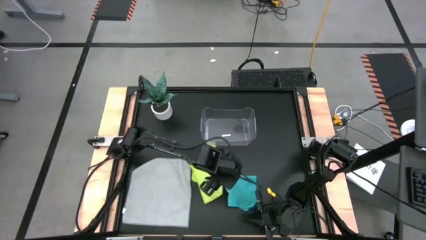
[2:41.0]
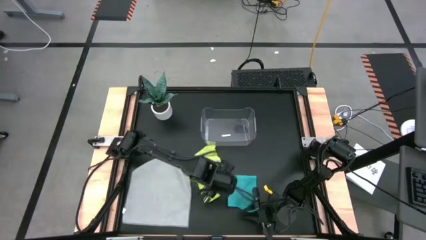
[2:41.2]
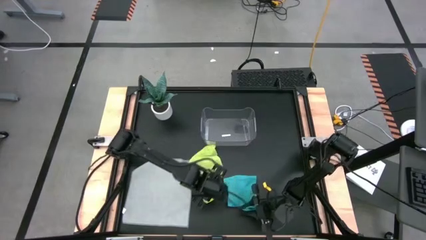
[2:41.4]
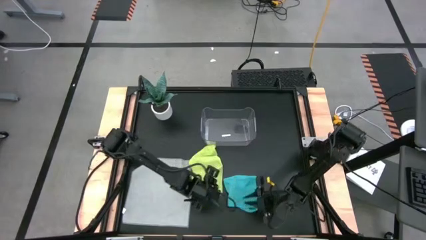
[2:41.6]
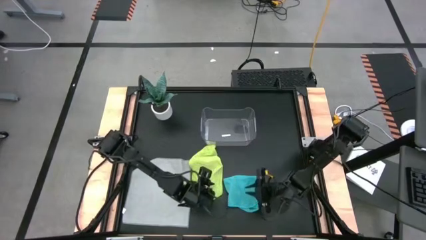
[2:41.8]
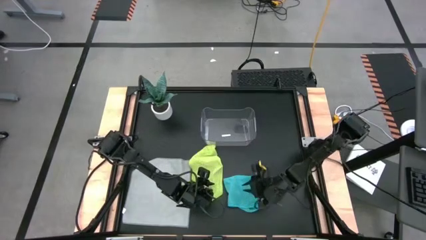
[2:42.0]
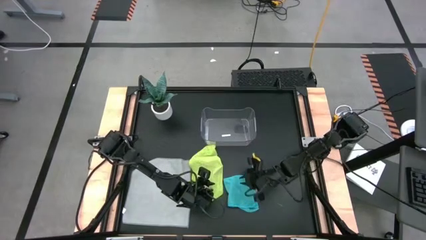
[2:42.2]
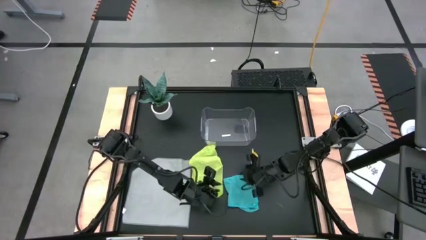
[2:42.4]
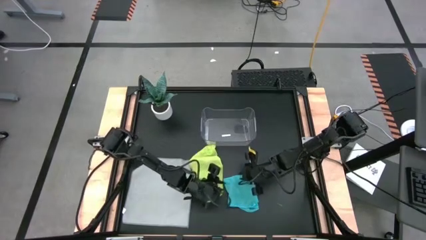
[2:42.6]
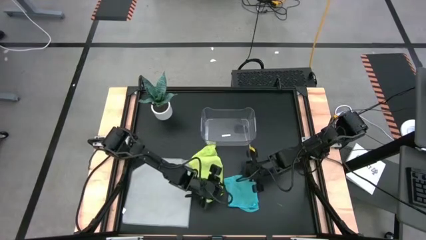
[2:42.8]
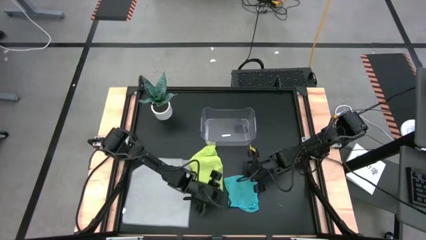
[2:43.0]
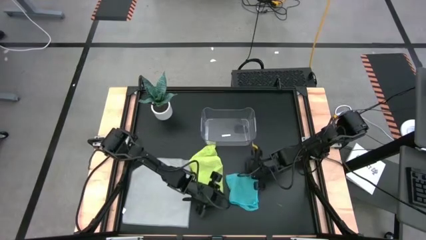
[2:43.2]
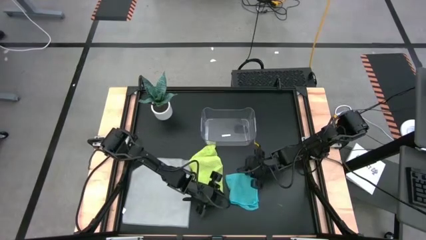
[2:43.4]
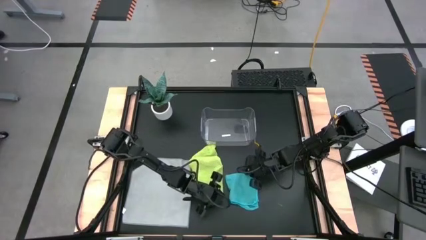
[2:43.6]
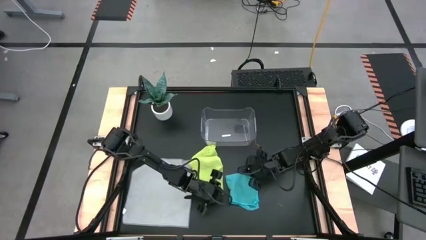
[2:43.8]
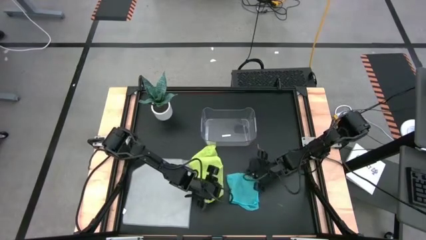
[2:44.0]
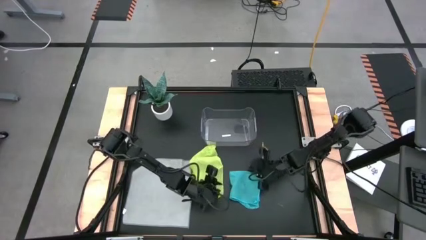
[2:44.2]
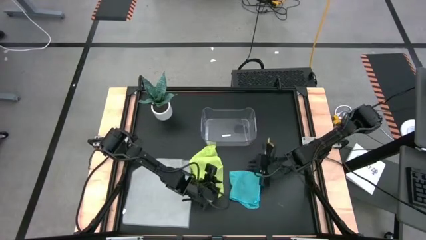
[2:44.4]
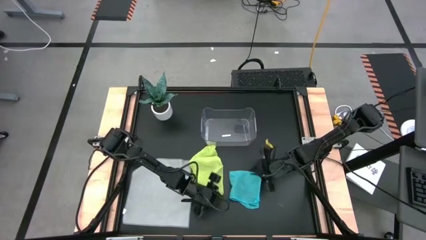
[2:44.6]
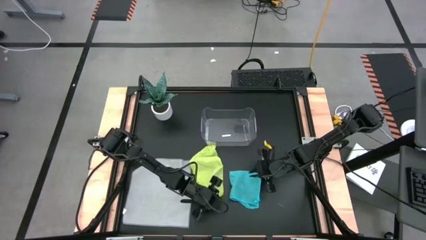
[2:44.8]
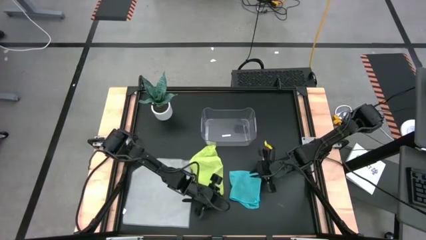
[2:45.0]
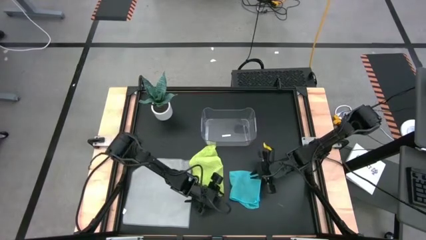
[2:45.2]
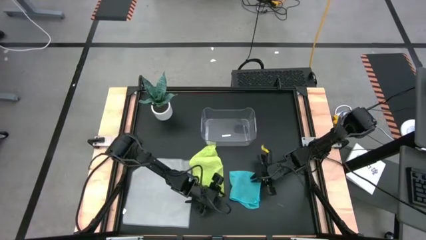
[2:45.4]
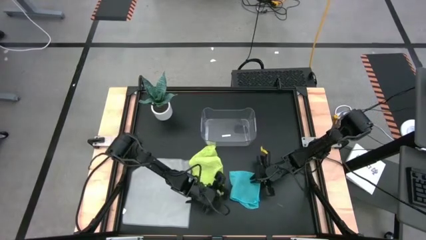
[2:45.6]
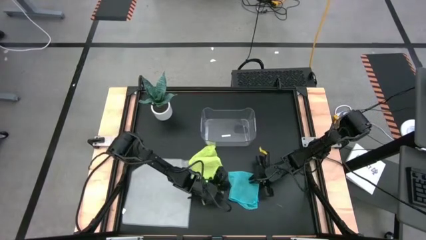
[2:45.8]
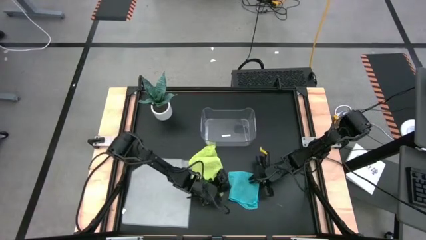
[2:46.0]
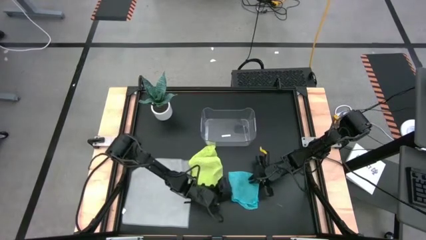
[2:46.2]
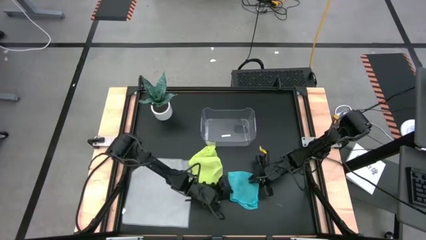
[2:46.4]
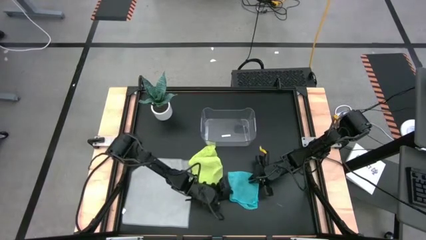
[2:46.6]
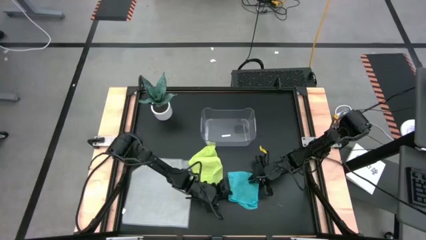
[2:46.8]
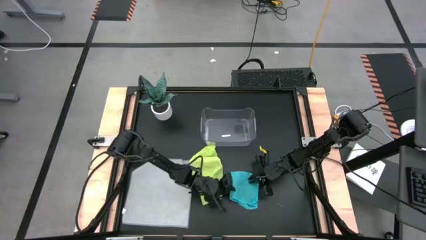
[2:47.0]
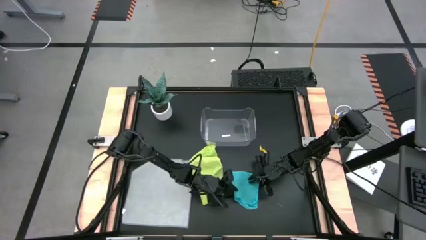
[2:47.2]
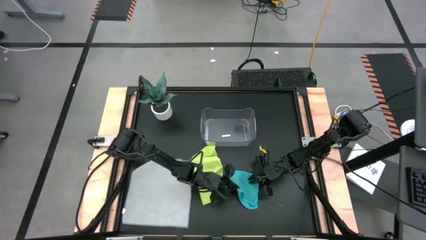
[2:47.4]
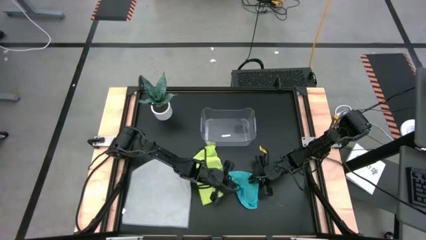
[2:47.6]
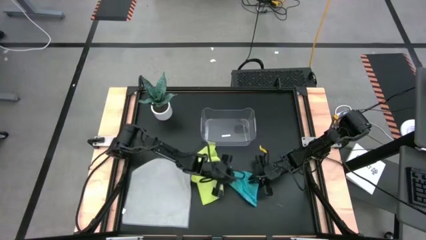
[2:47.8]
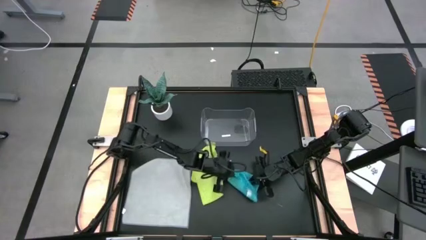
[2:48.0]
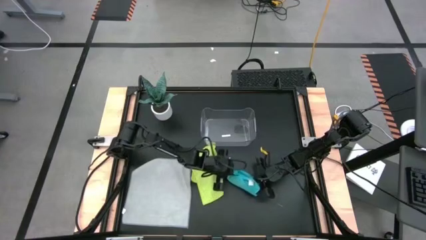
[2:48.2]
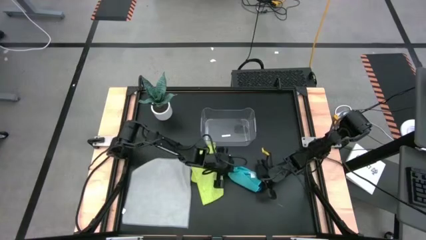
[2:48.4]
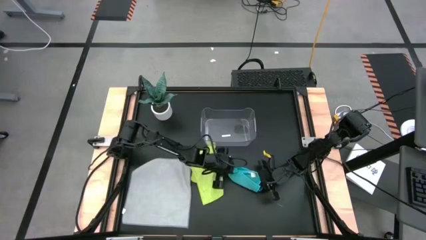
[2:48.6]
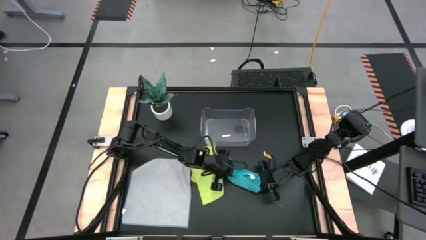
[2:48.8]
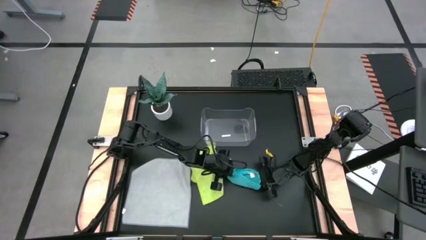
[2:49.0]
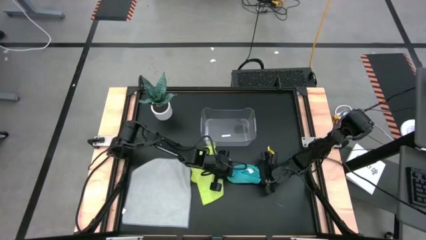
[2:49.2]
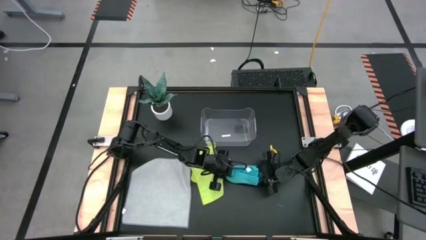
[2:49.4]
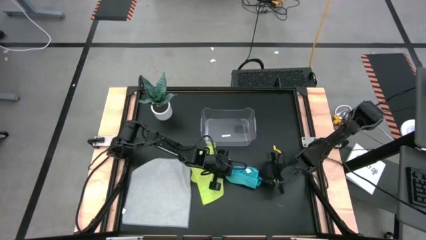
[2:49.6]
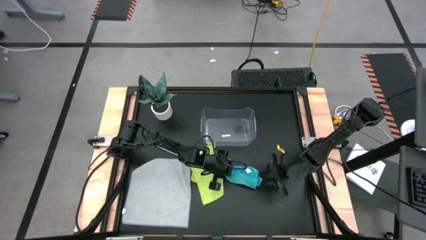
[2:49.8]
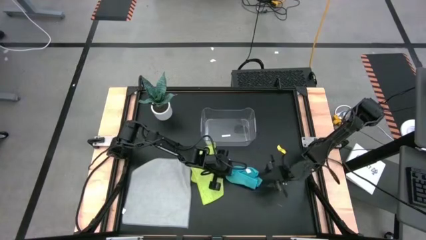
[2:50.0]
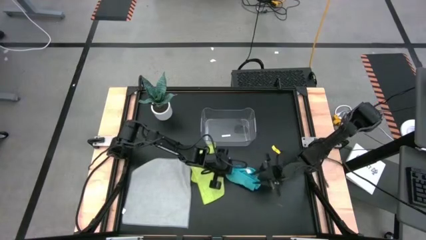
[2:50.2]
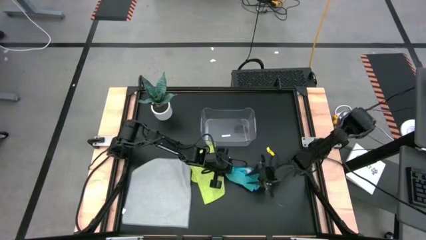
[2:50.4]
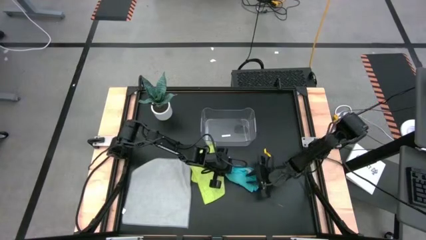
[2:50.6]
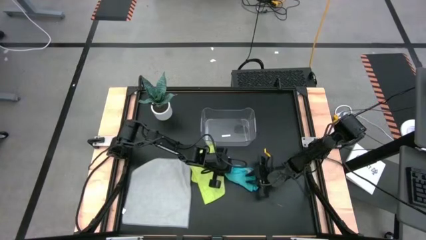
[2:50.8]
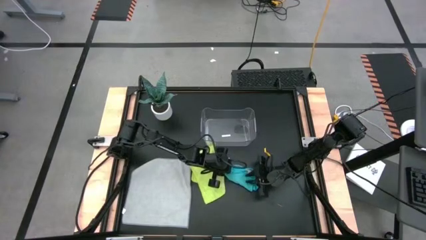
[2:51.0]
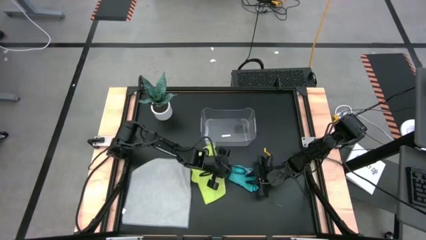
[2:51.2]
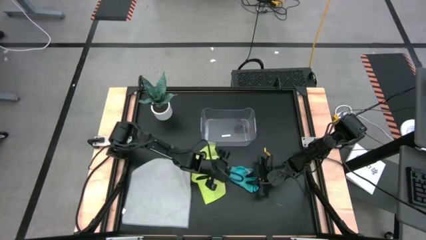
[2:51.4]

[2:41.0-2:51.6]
Task: Fold microfiber towels
Fold the blue towel

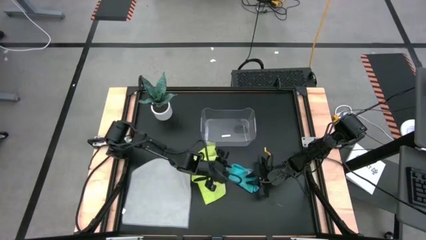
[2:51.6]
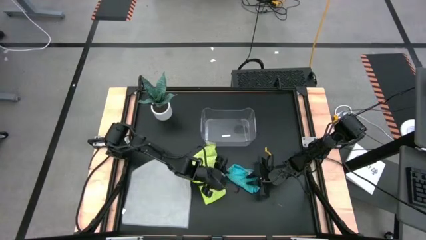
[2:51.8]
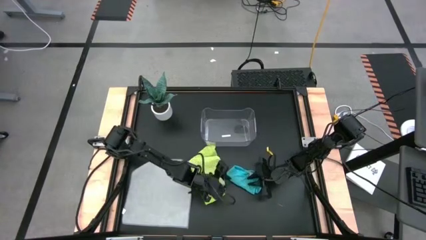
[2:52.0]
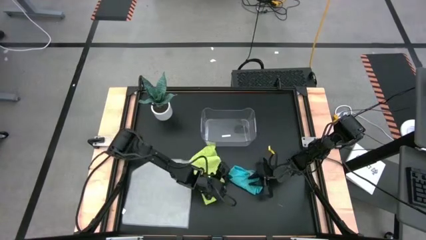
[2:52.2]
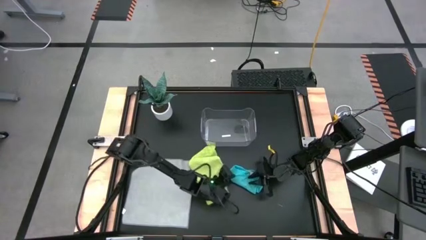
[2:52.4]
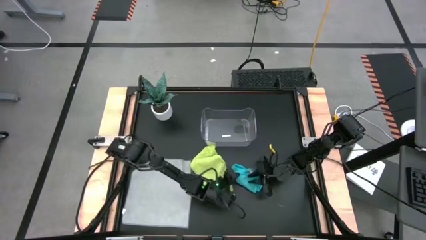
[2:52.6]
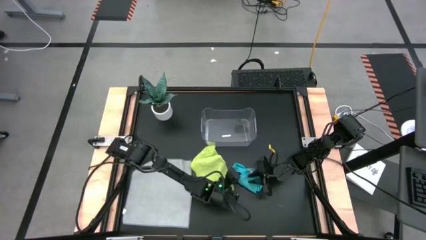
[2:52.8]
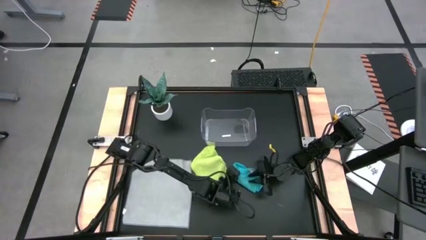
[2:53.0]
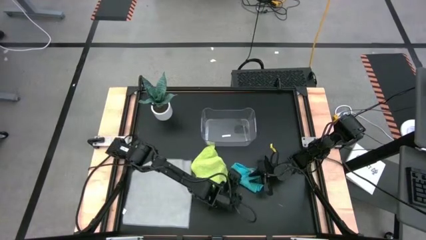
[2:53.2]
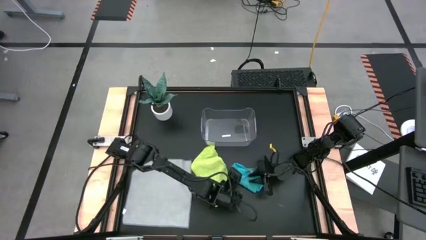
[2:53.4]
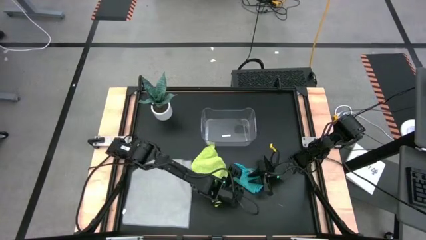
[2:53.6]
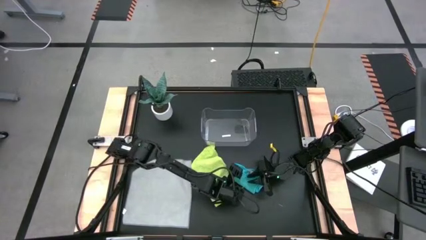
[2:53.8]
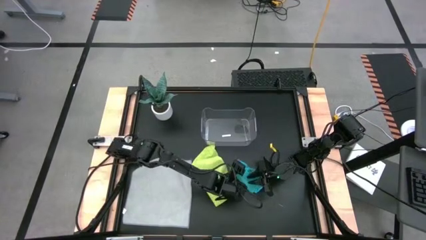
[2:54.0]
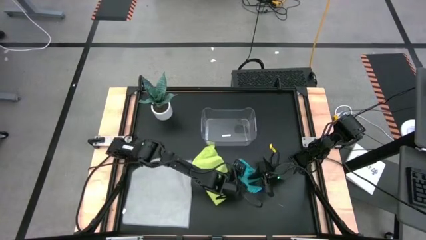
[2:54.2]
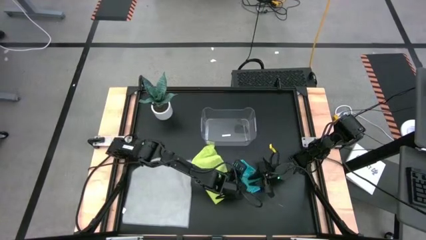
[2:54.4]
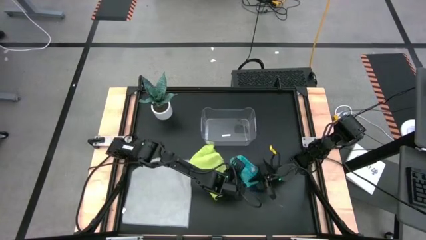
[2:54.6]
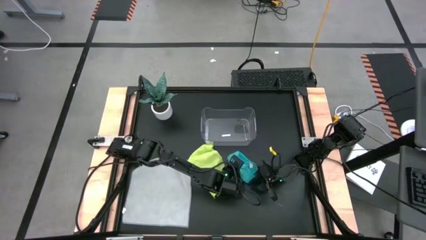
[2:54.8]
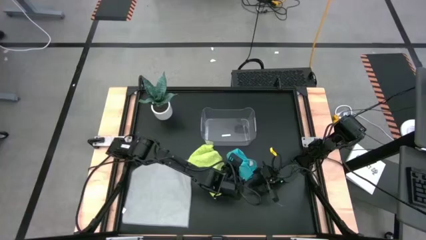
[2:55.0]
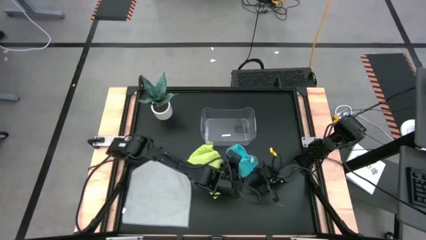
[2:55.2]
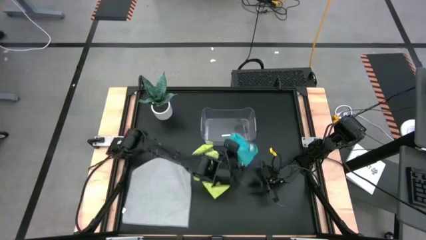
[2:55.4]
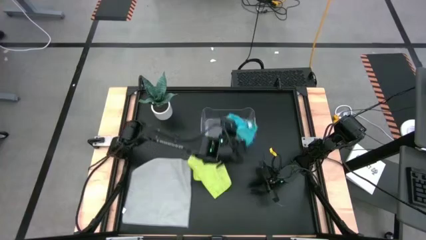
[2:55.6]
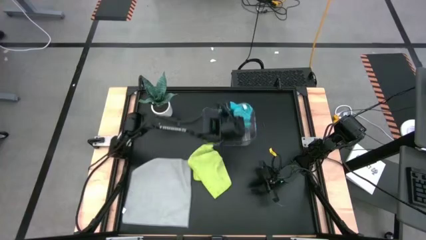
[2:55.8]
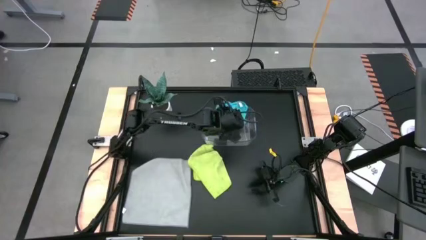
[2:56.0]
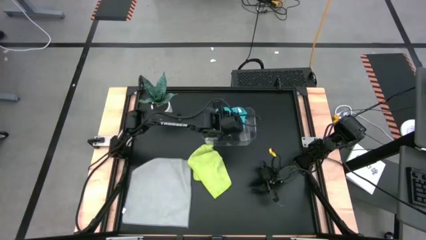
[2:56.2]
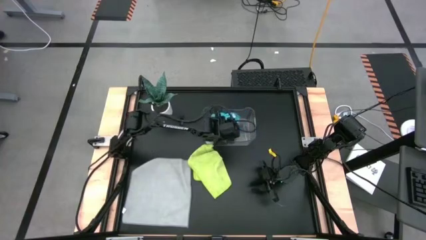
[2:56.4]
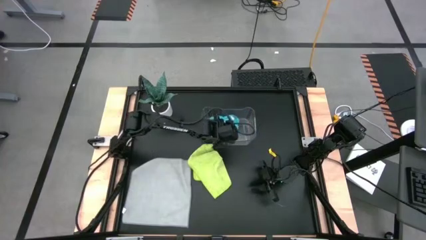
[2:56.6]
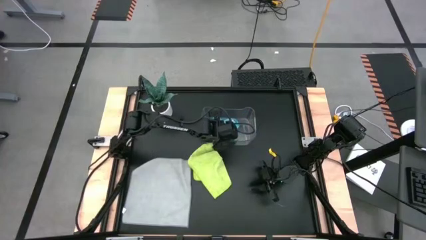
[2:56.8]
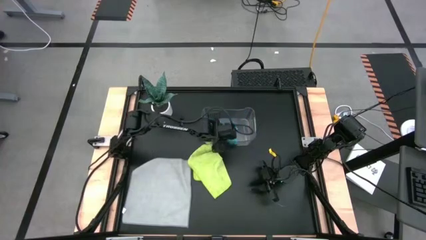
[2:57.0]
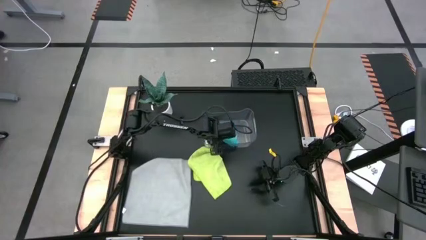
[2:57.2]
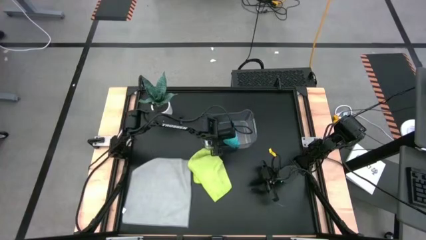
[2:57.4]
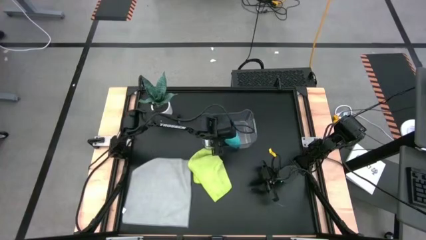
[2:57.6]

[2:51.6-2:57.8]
Put the blue towel into the bin
